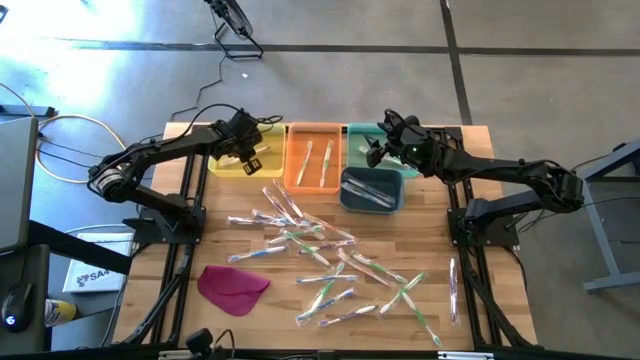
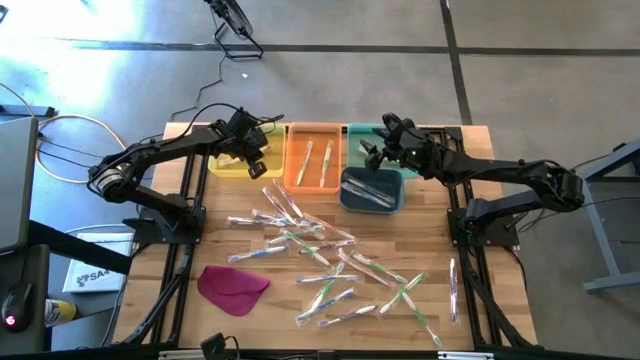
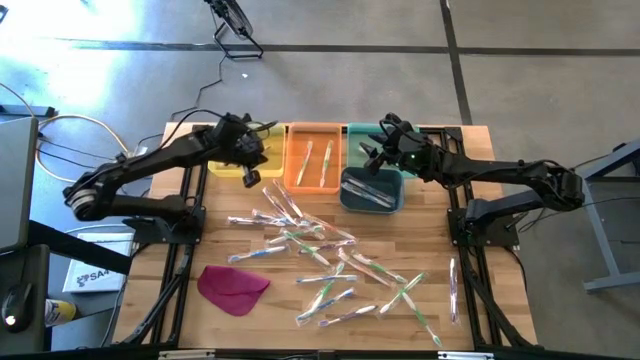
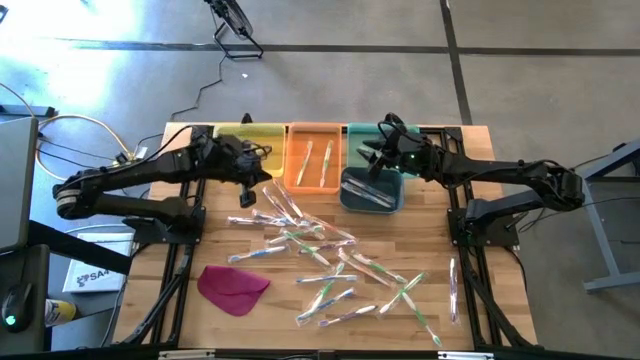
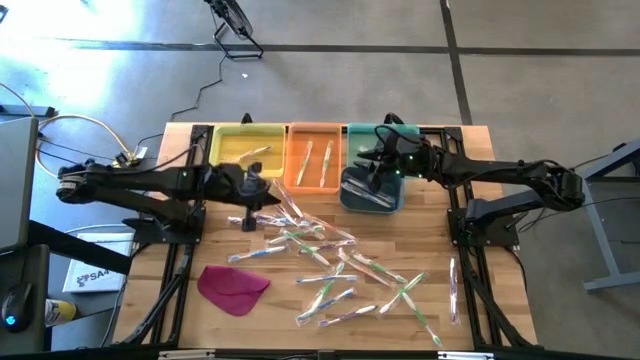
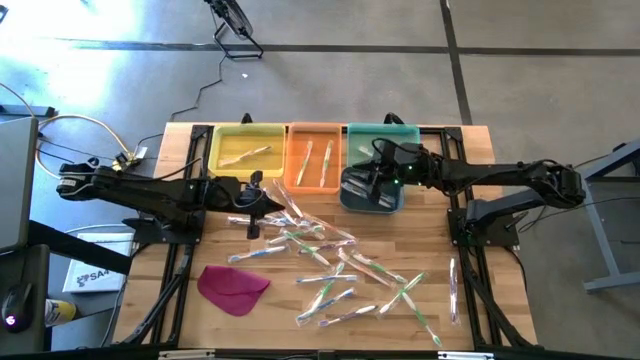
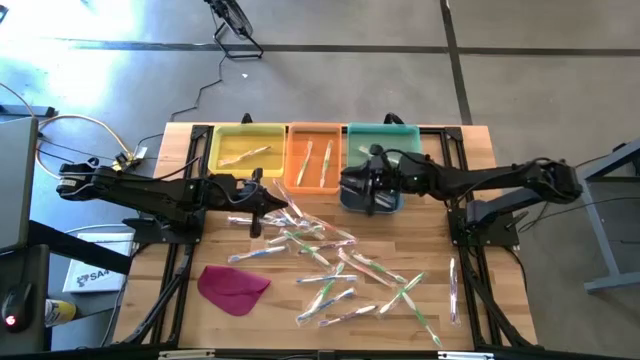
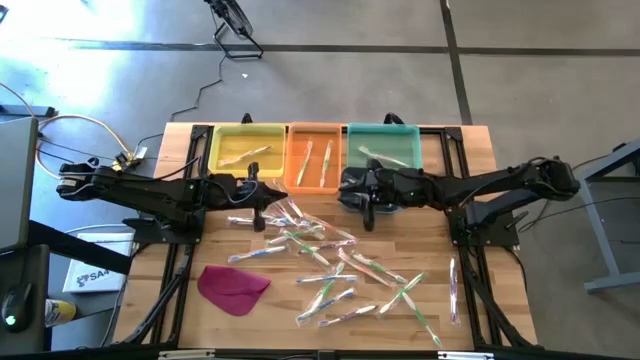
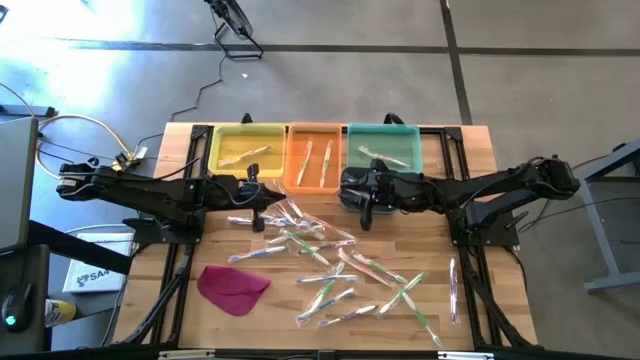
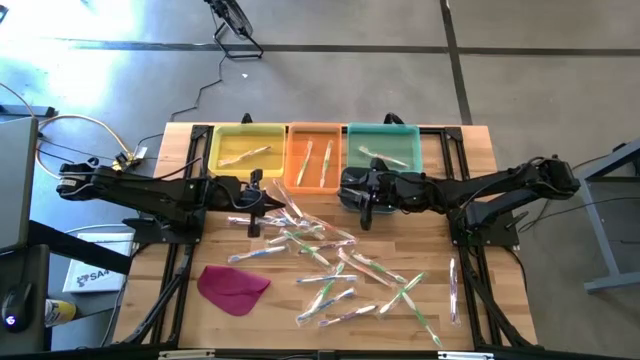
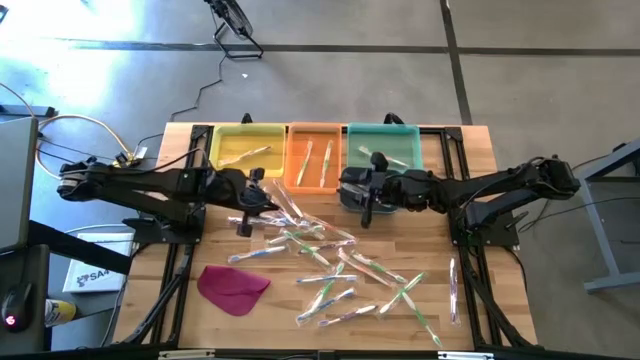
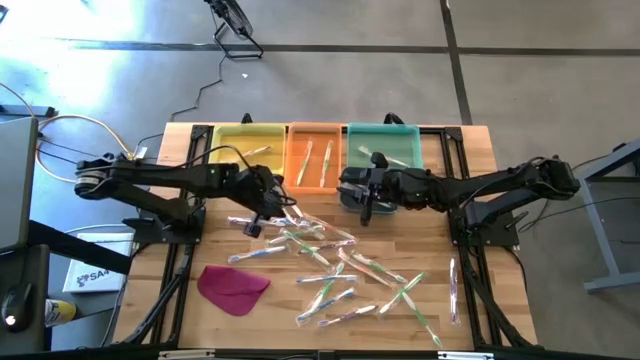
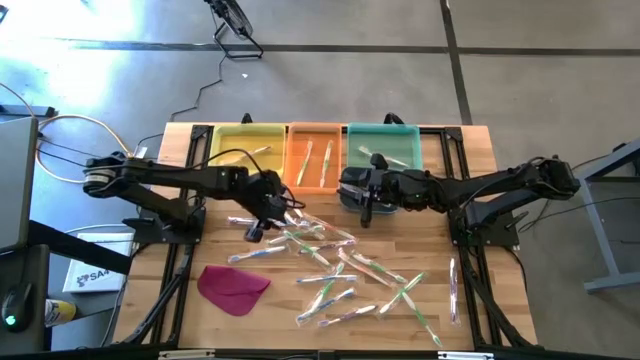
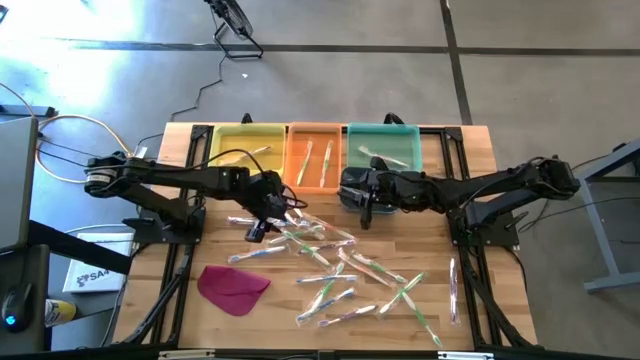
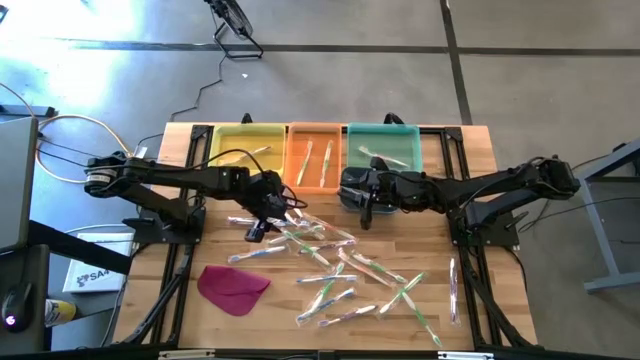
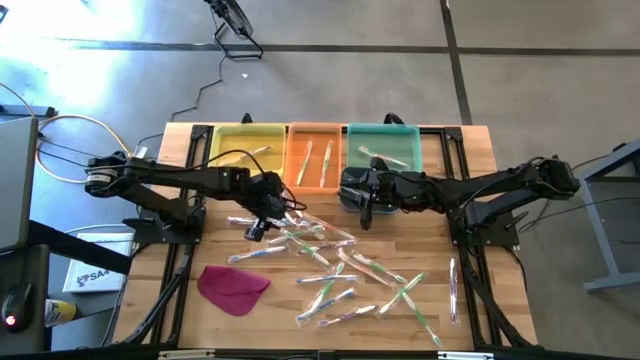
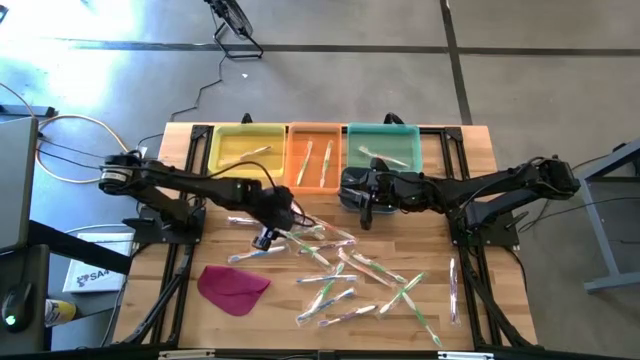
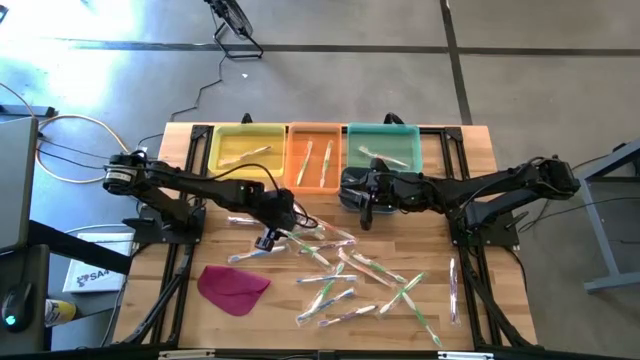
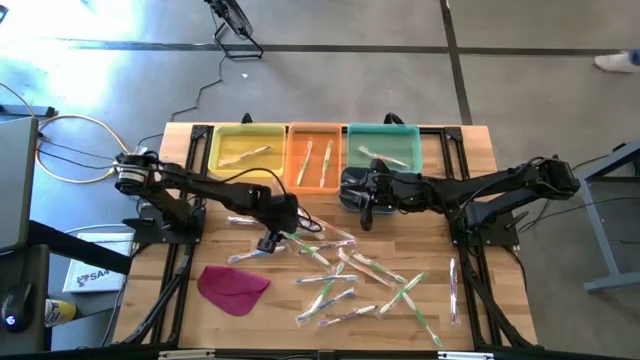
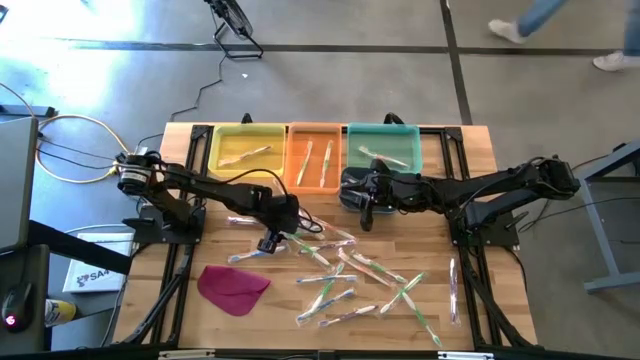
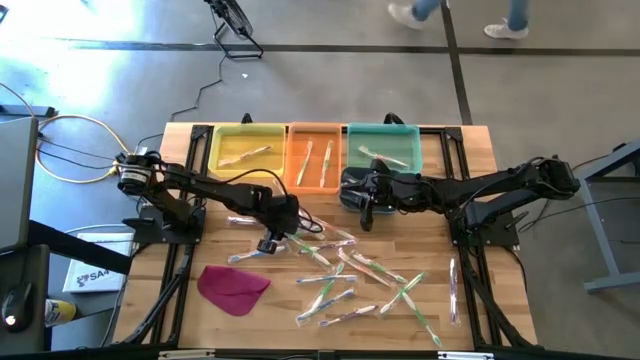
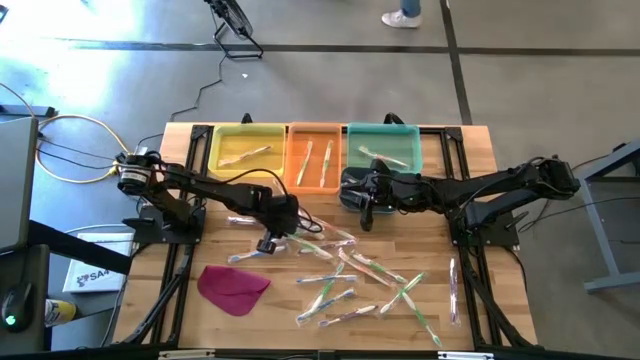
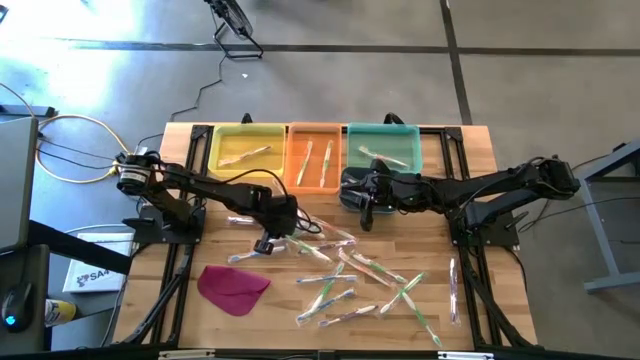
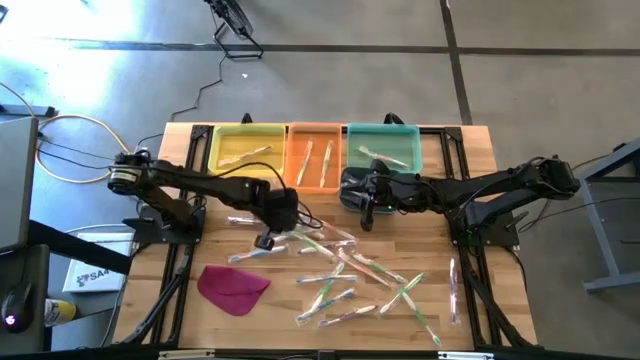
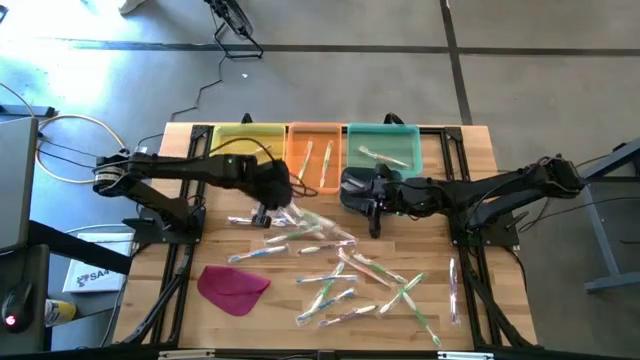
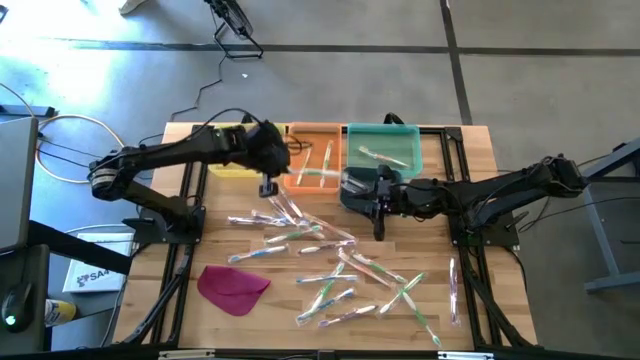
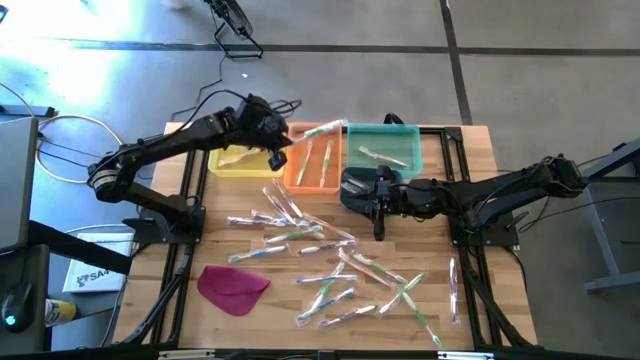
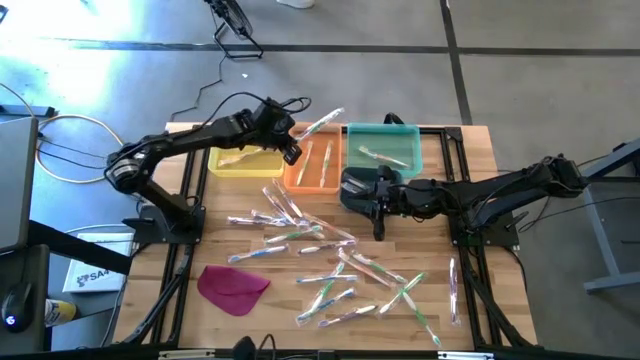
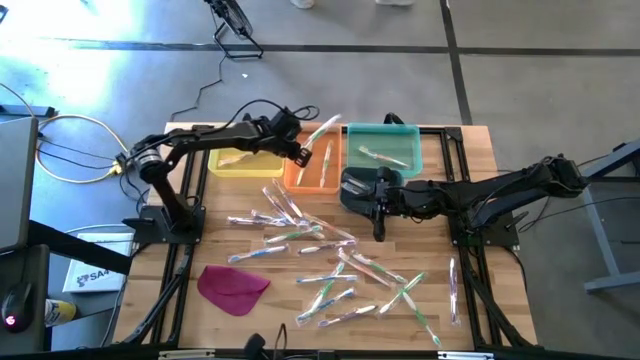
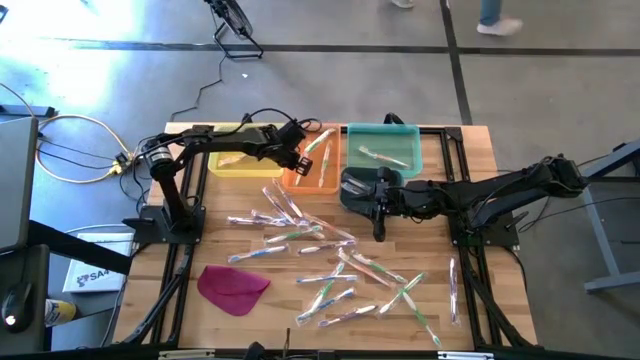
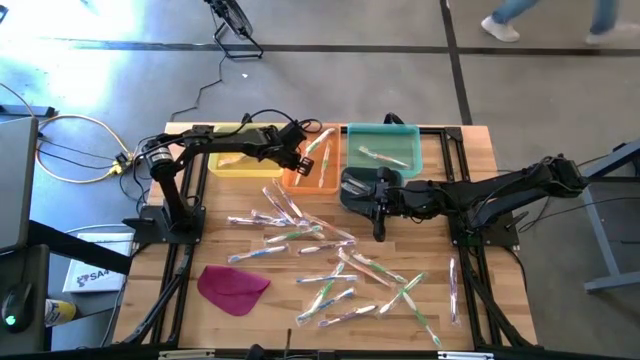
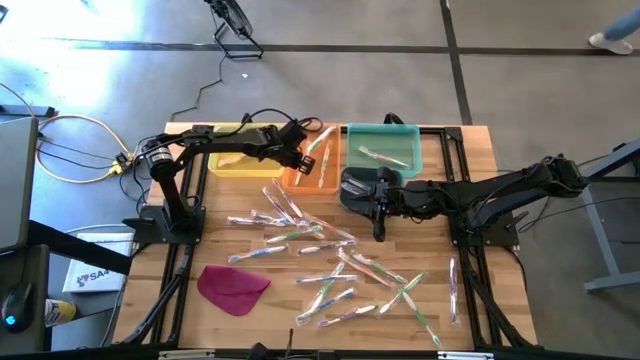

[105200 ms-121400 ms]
Task: Pick & Place Toothbrushes
Put the green toothbrush into the orange bin

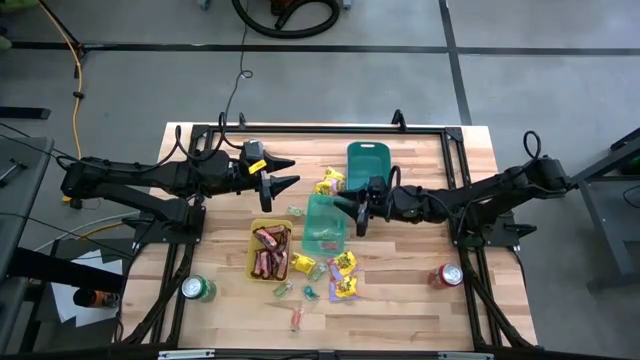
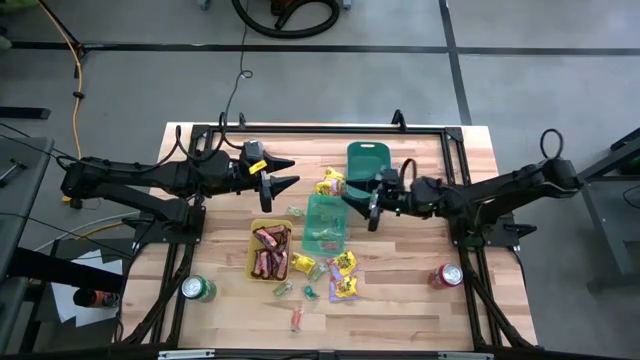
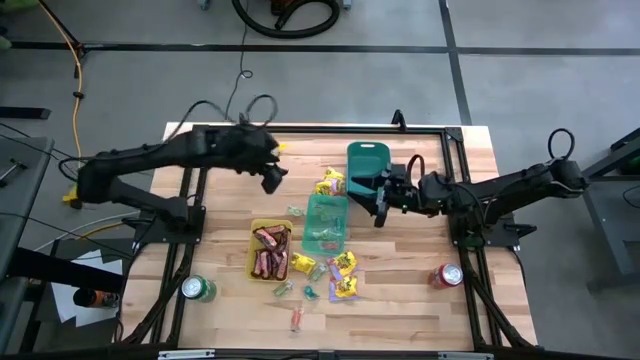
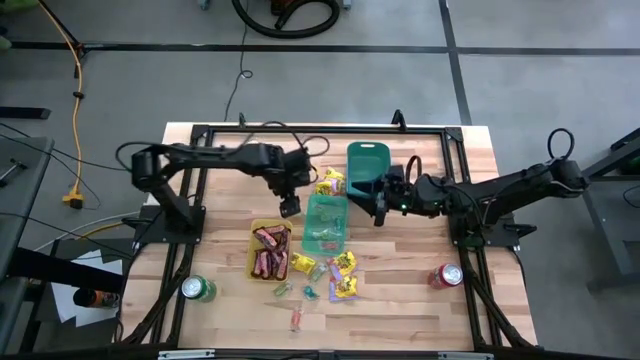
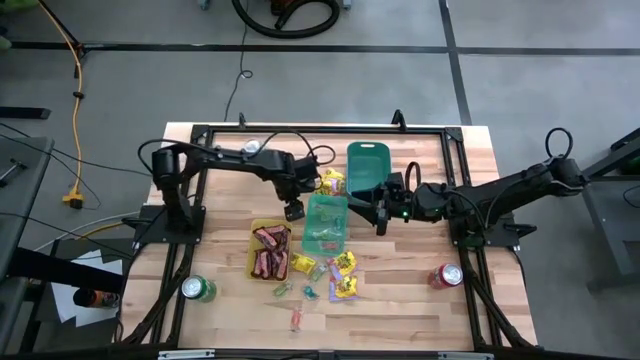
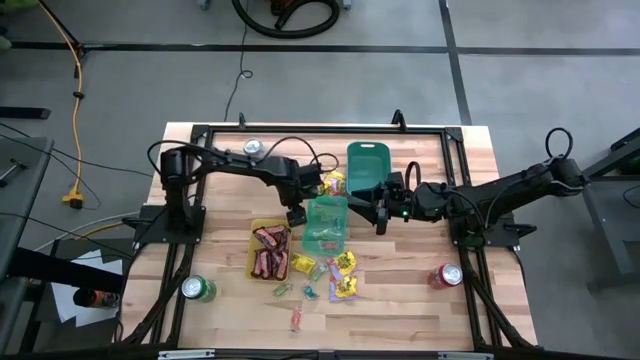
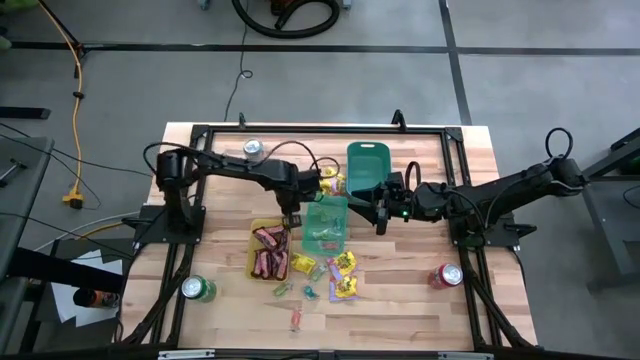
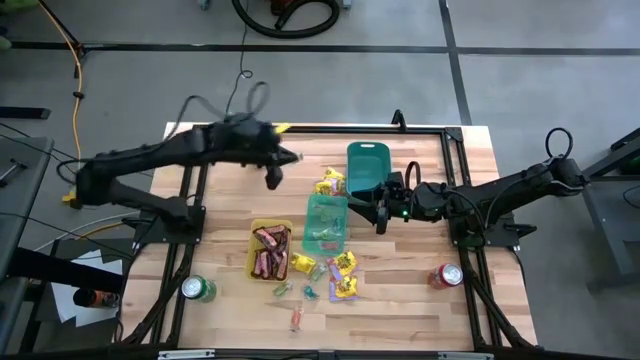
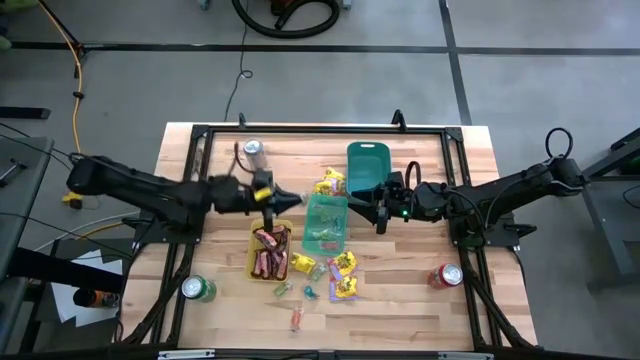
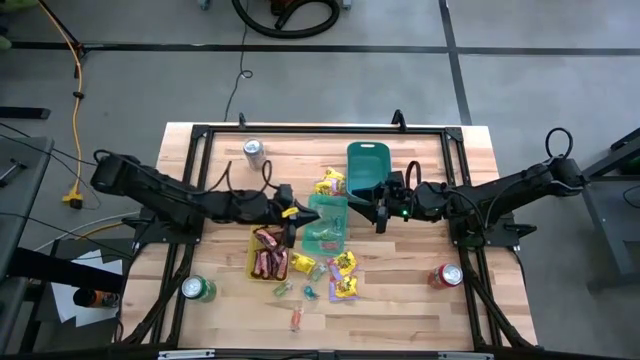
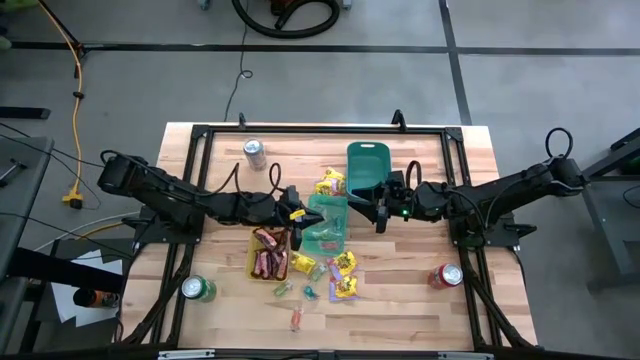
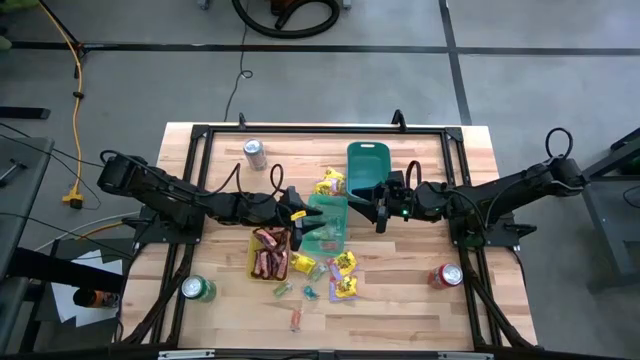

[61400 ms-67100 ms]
Task: Sort candy
Put the green gummy into the light blue bin
